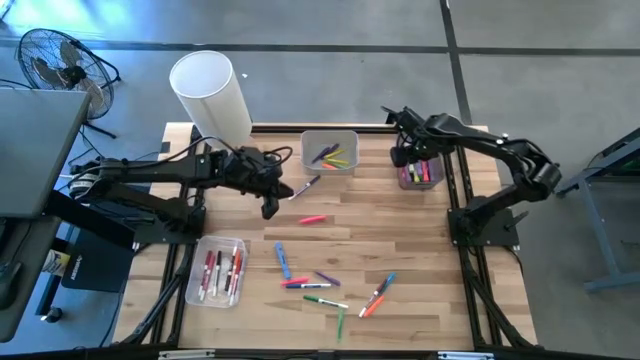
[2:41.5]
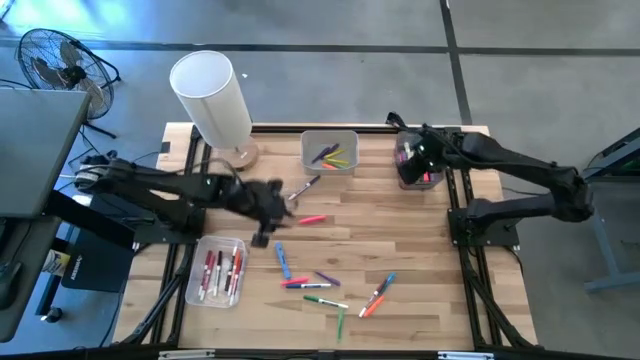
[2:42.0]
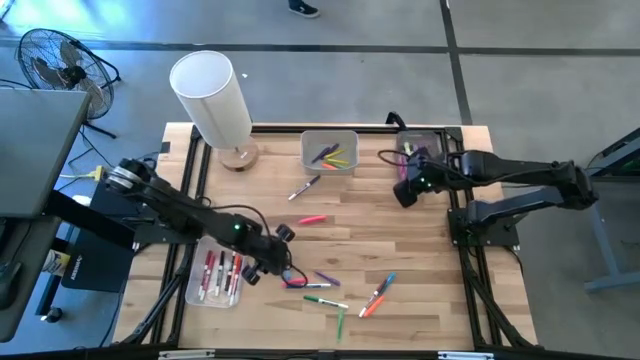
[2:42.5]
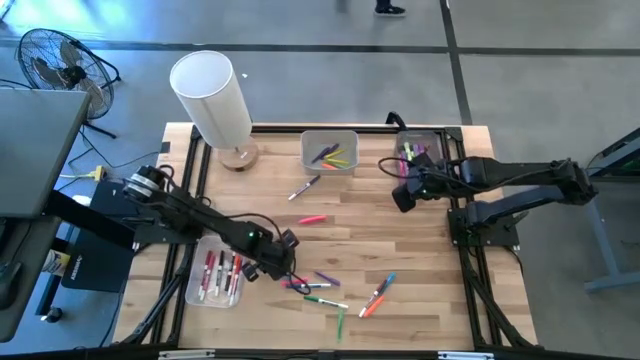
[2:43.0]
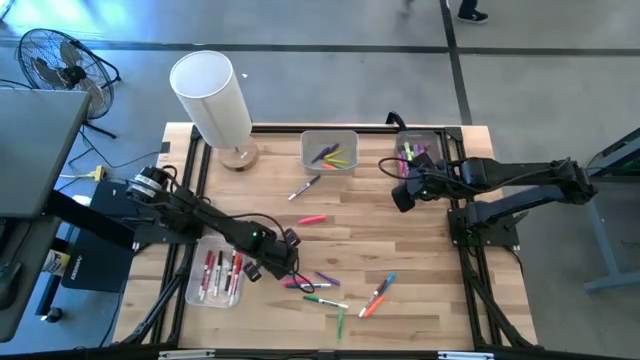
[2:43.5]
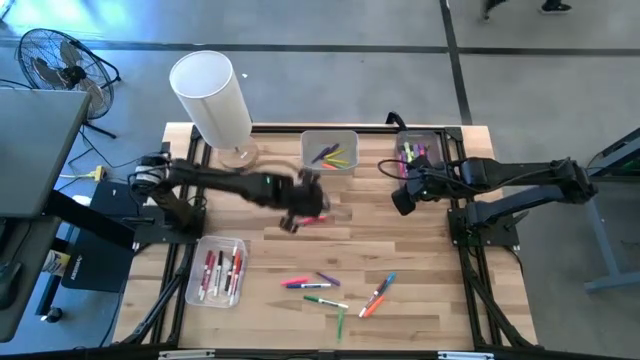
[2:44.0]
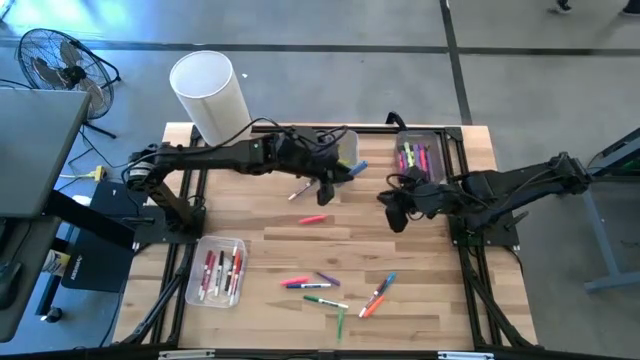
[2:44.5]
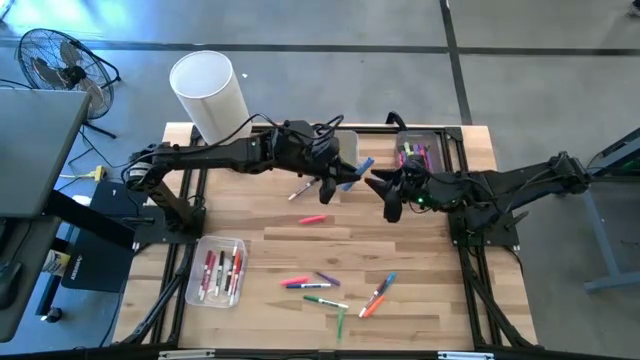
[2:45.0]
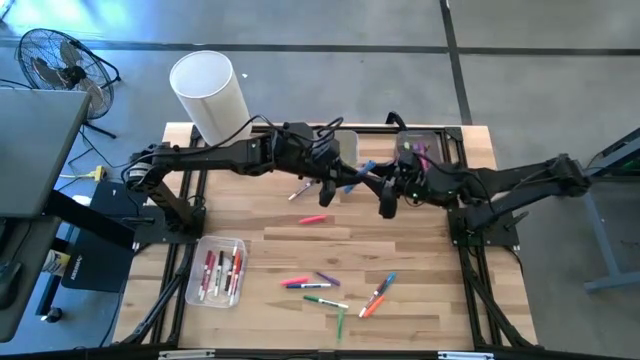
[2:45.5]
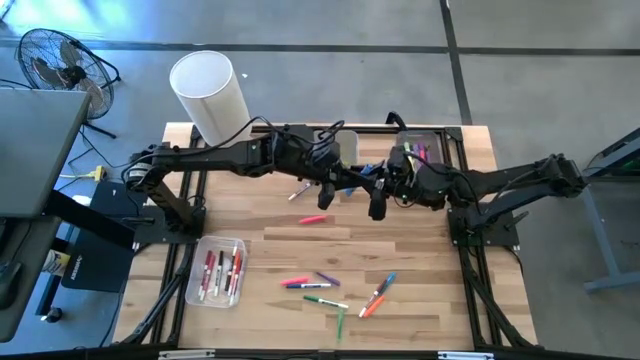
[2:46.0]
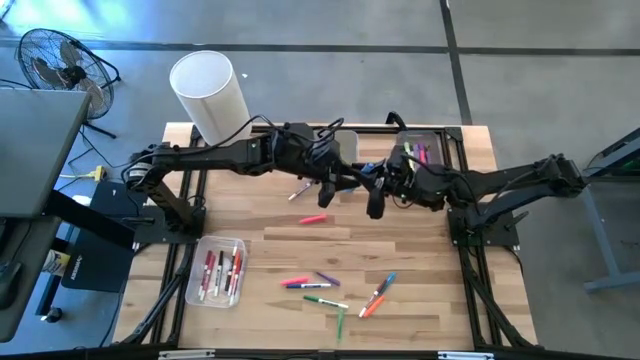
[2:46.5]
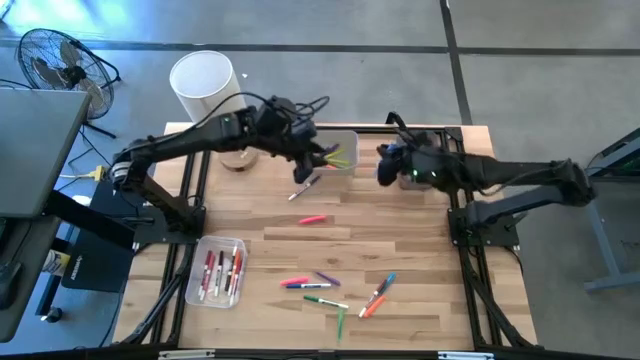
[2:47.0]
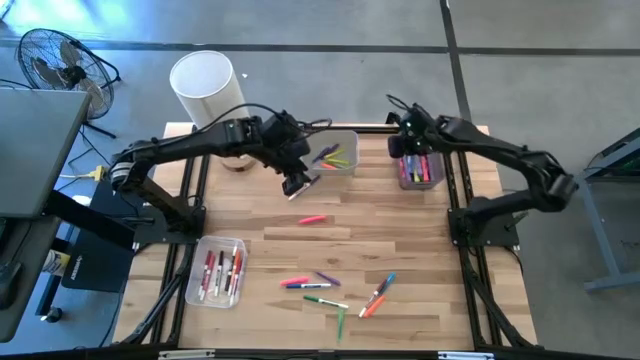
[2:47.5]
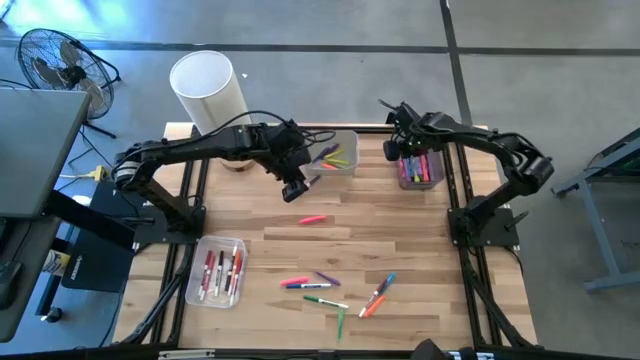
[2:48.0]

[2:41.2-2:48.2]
Task: Pick & Place Markers
Put the blue highlighter pen into the black bin

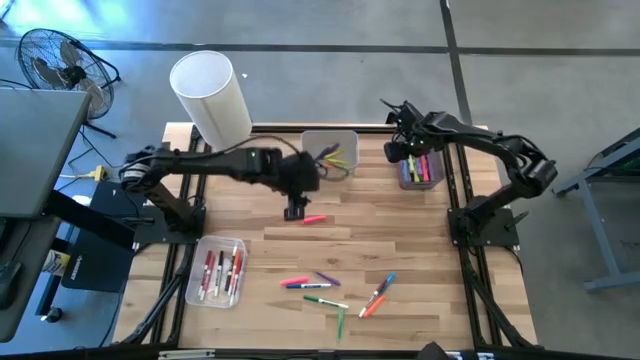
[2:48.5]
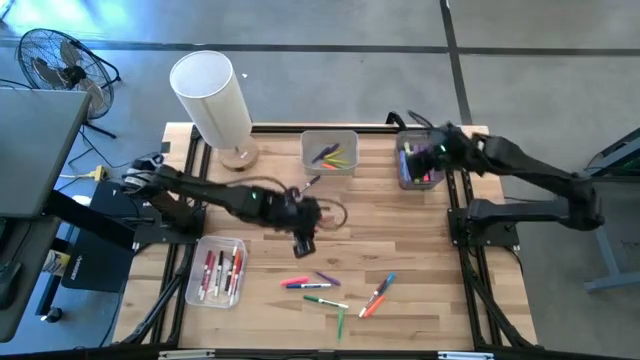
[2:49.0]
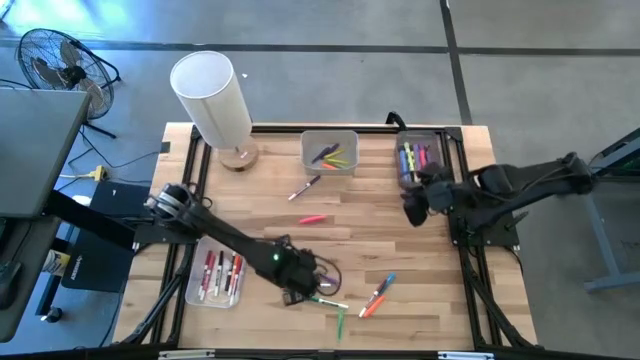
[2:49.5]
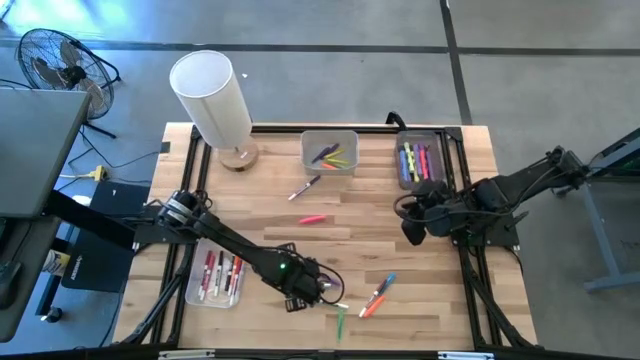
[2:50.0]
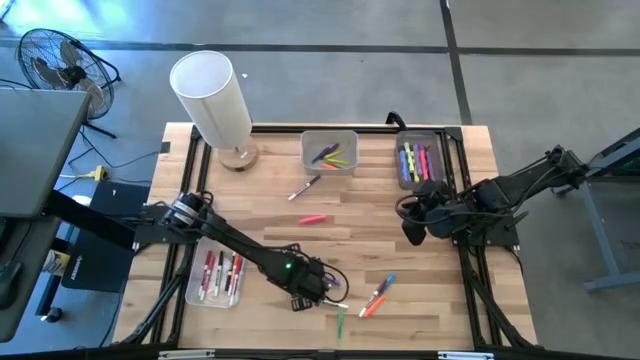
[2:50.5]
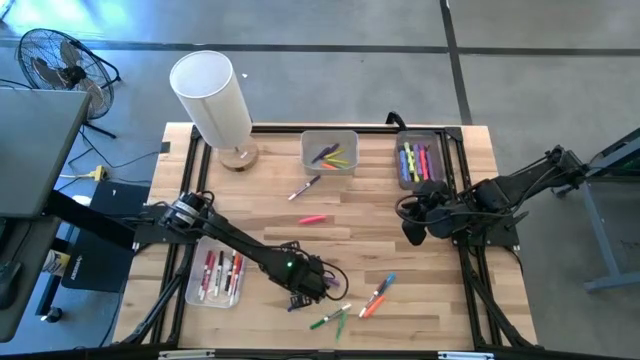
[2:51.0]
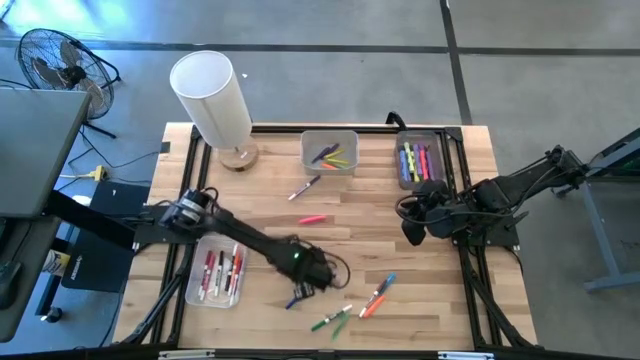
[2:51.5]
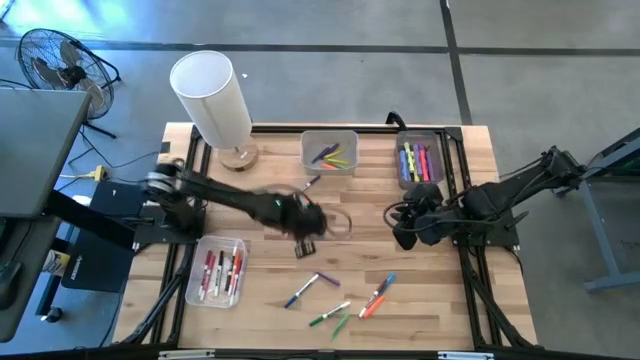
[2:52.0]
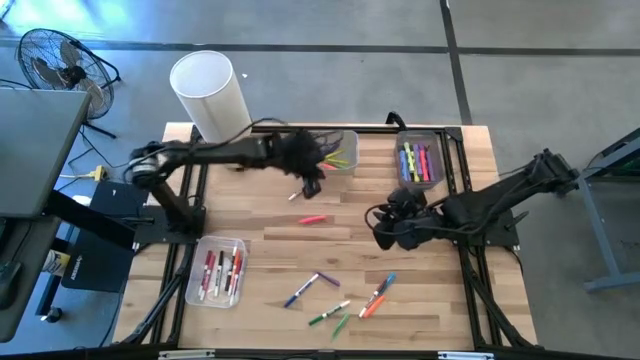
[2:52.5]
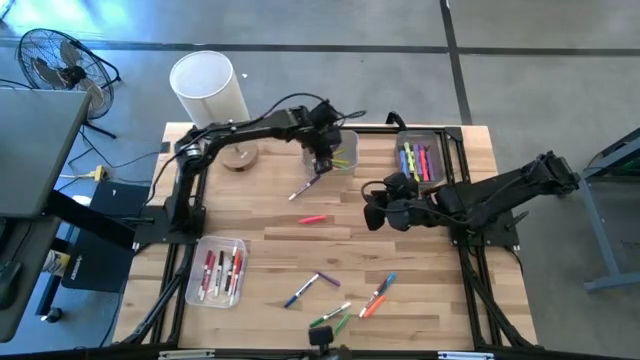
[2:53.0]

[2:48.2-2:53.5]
Put the pink pen into the white bin

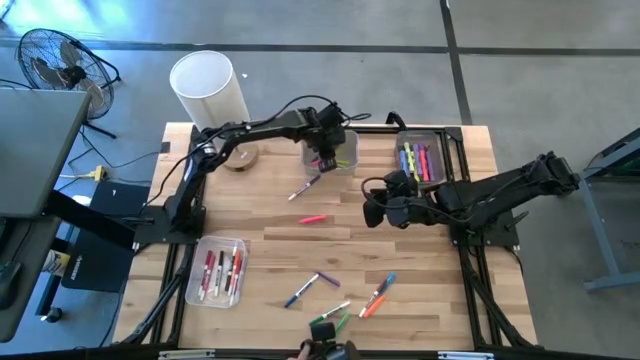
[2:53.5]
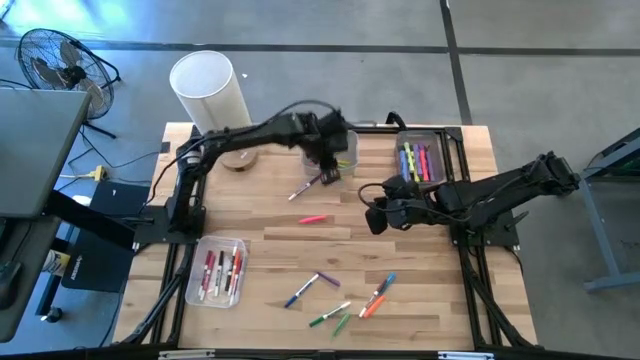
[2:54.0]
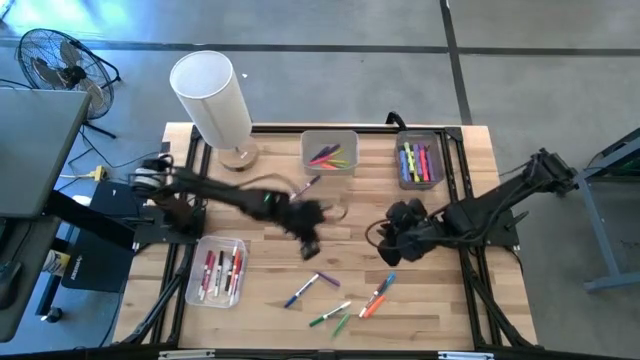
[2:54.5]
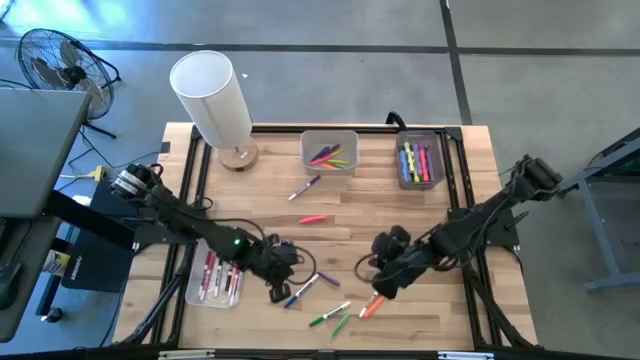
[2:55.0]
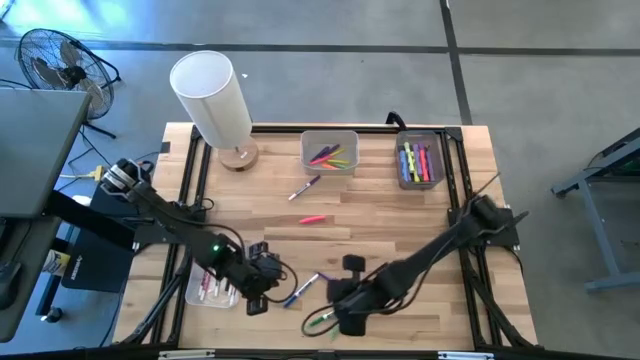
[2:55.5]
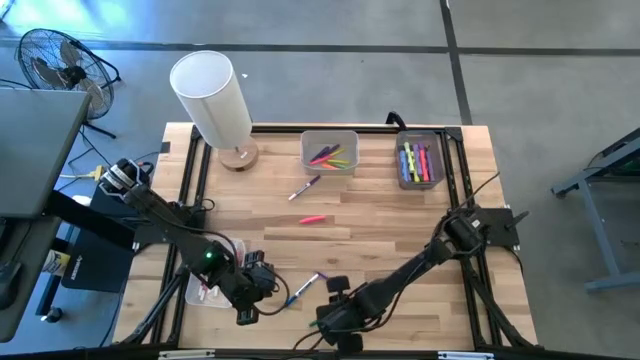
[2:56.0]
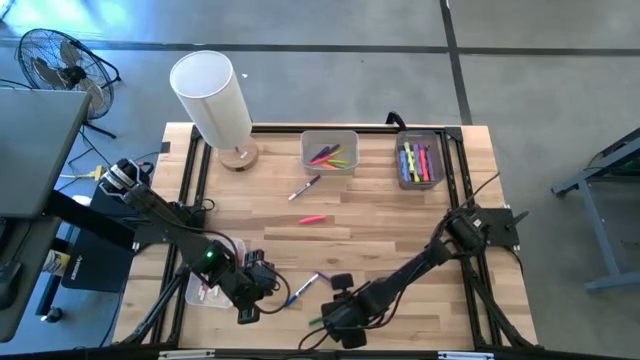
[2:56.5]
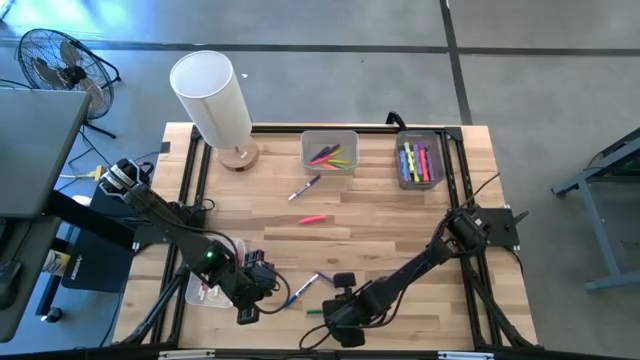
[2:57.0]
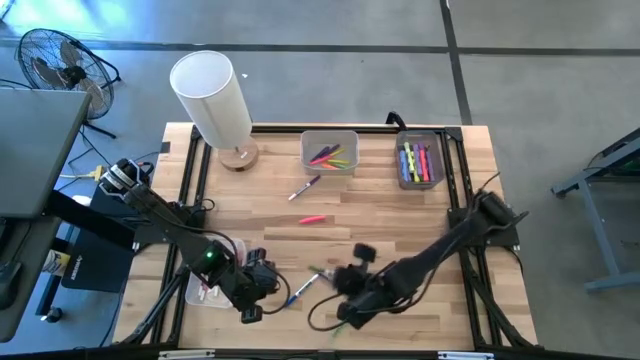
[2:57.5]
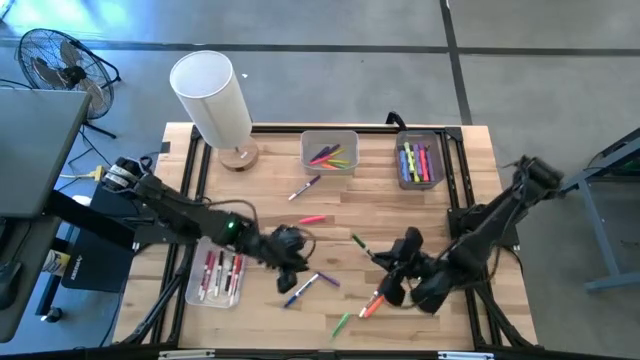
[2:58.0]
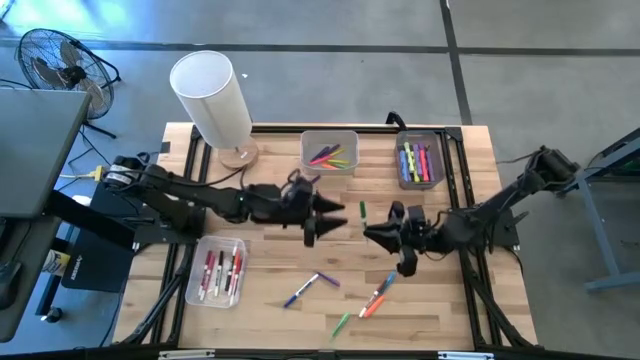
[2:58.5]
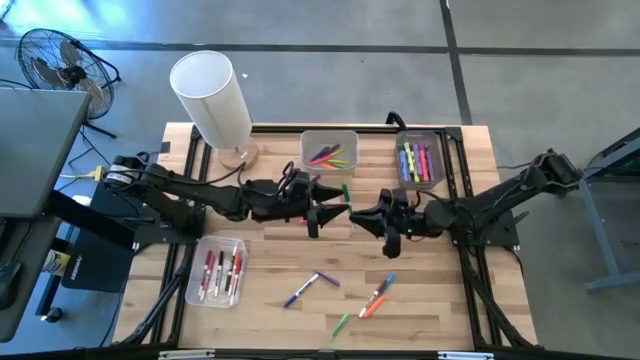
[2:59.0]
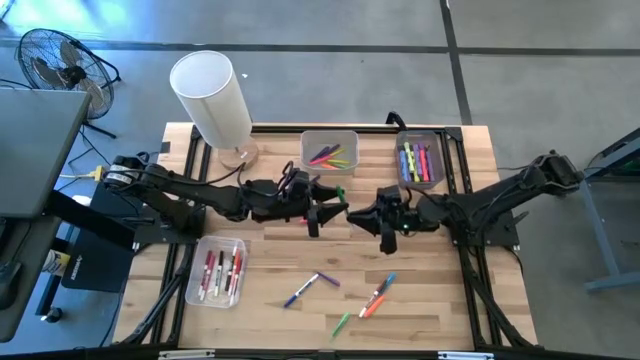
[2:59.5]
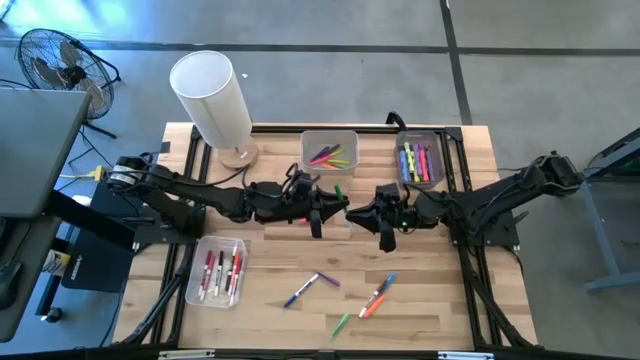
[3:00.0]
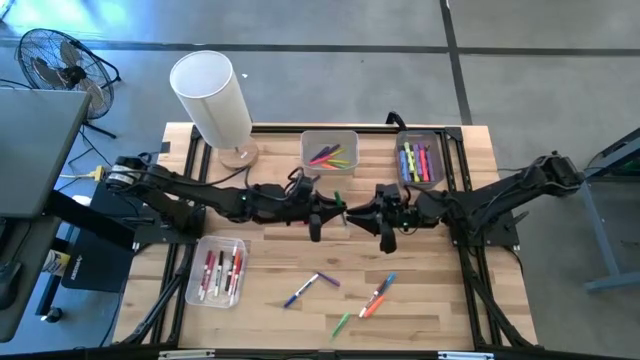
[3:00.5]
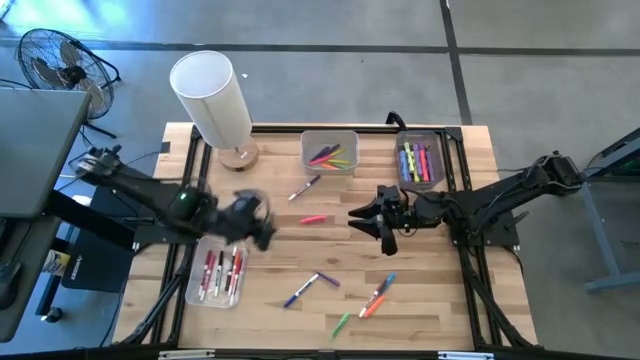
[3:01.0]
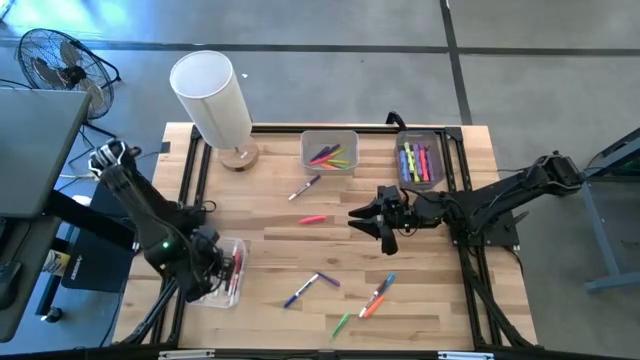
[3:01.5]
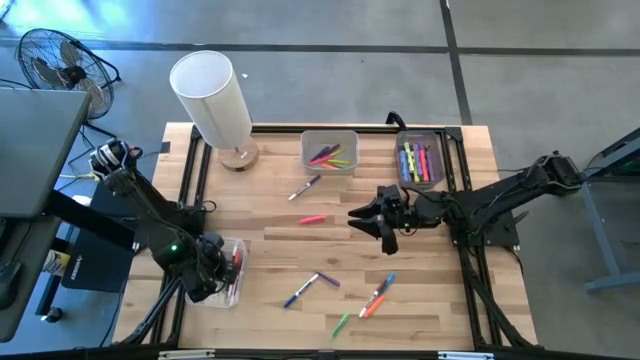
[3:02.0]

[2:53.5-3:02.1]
Put the green marker pen into the transparent bin
